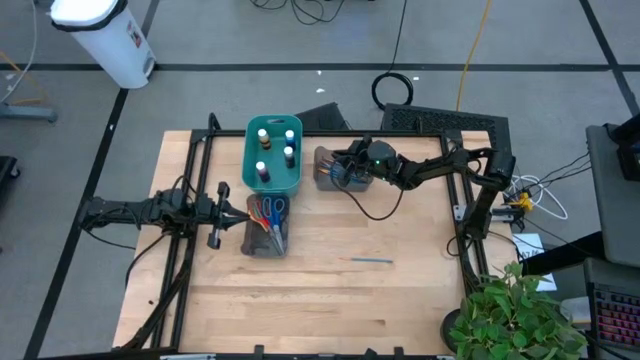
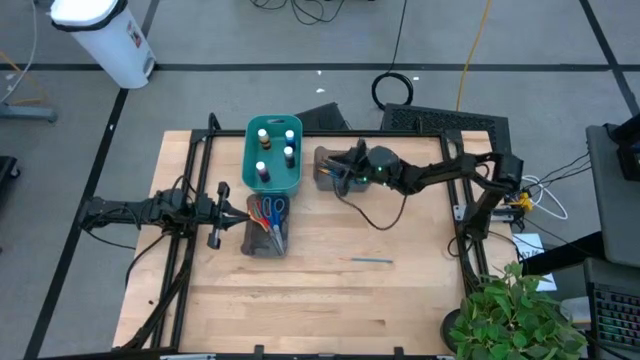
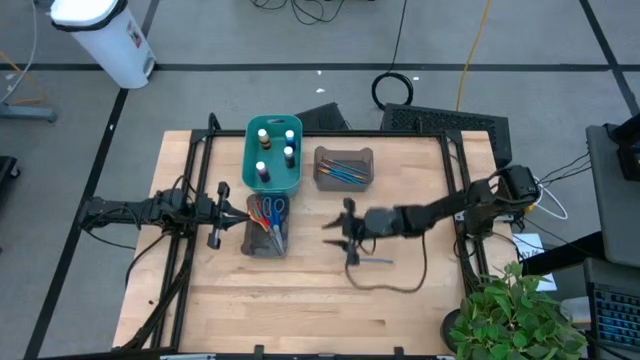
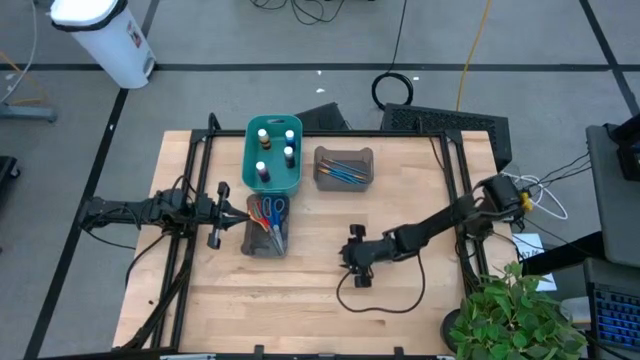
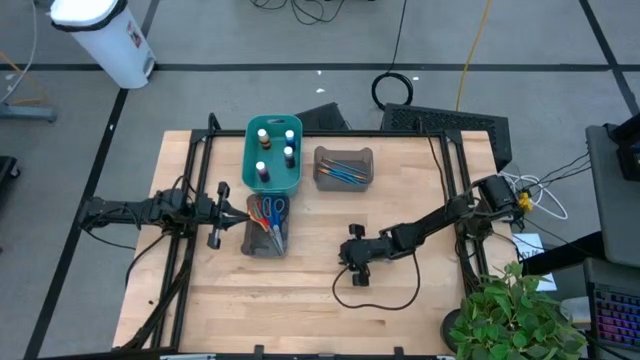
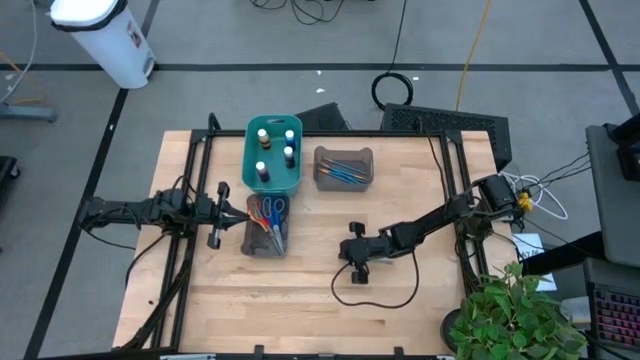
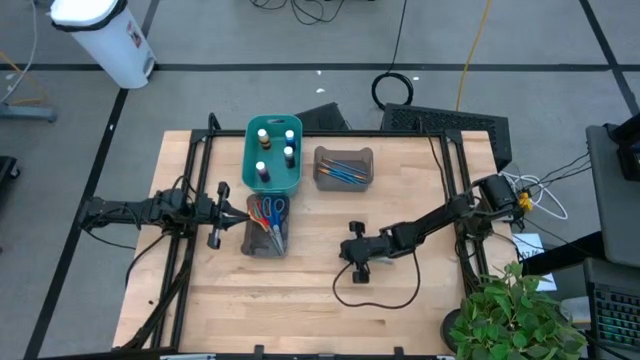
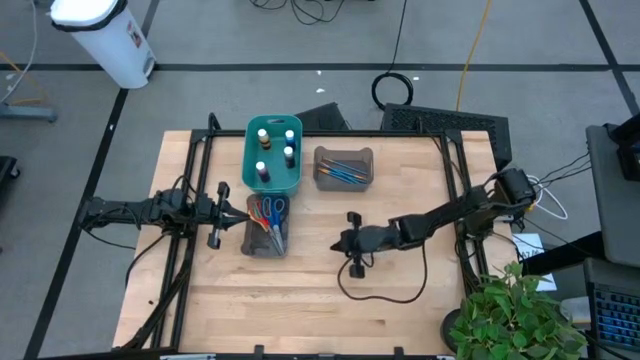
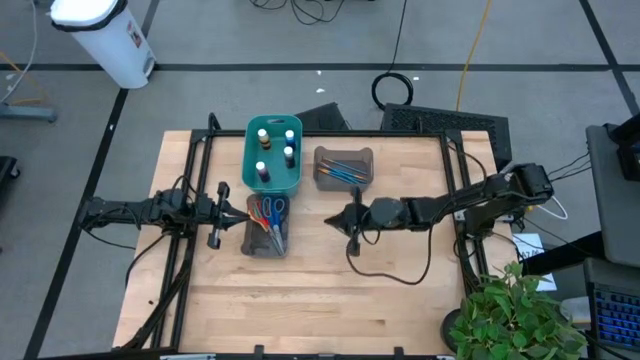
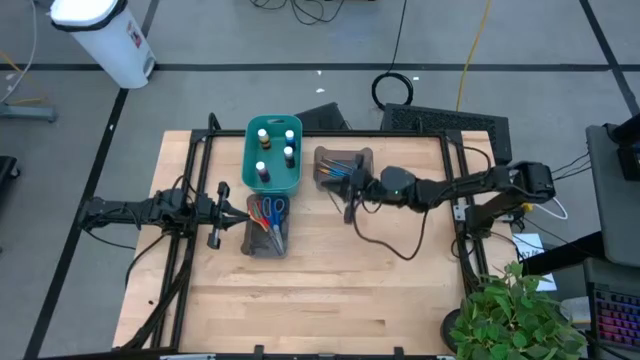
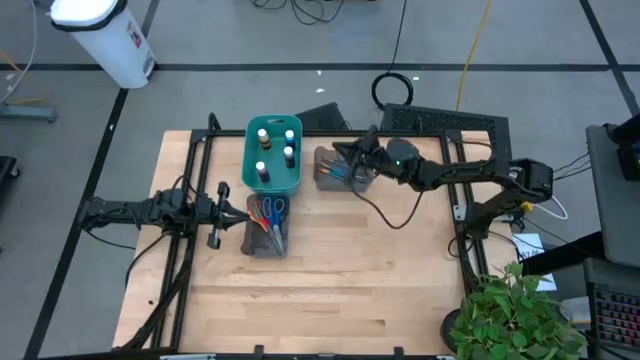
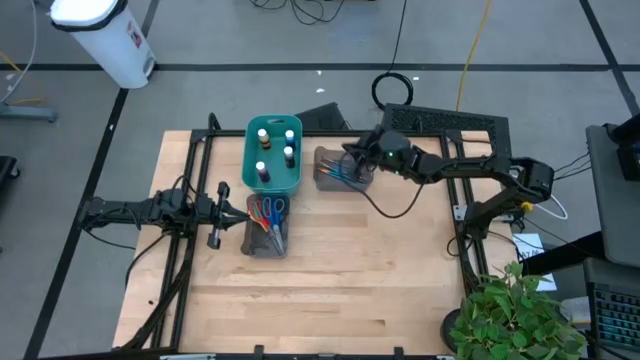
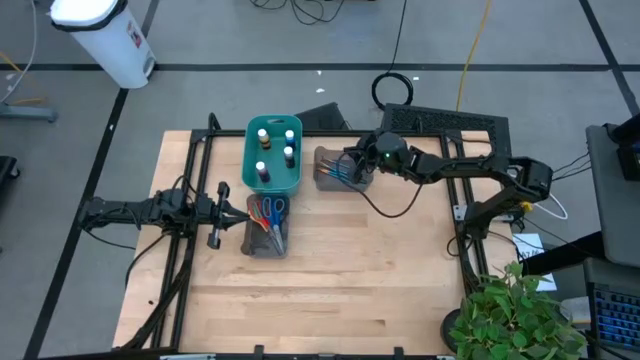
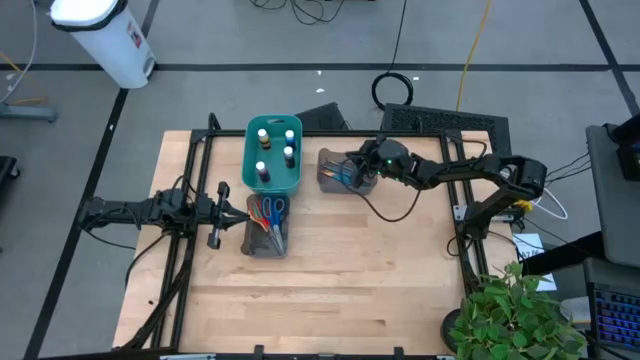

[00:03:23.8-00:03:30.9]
Task: Pick & Place Paint Supplies
Put the blue paintbrush into the top black bin

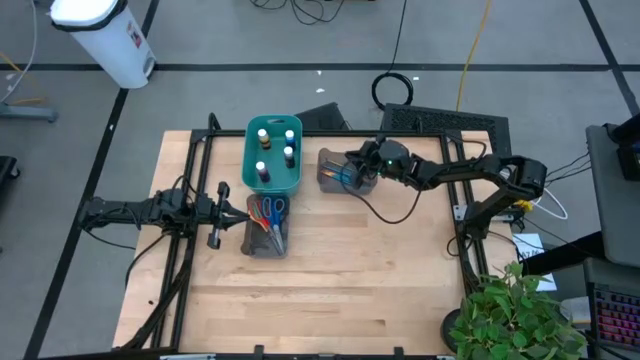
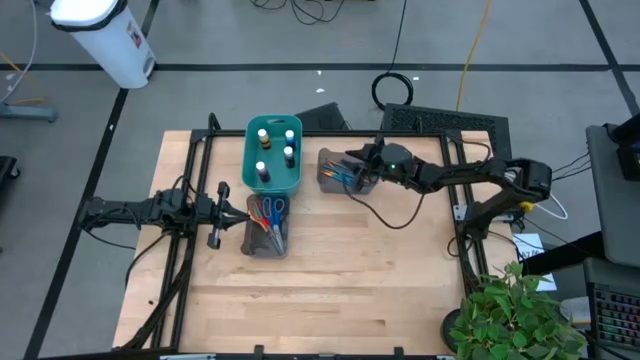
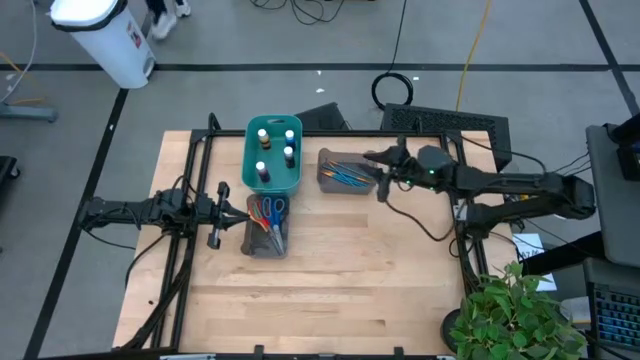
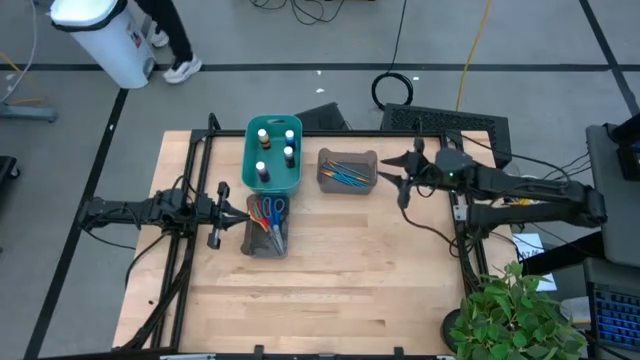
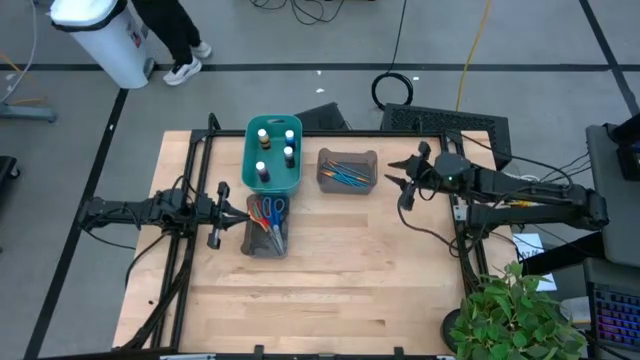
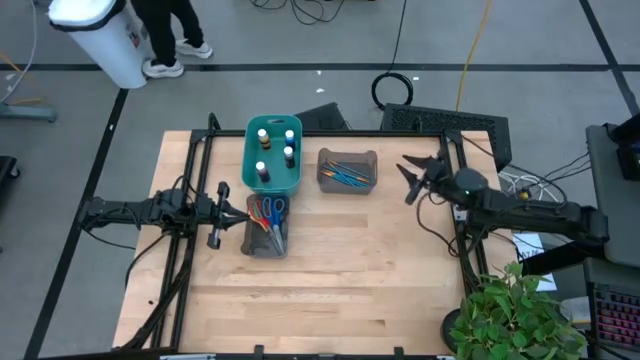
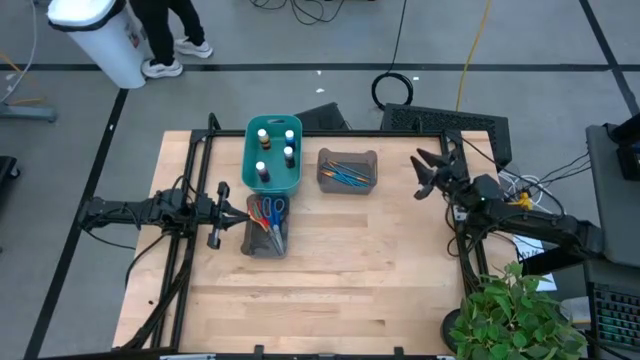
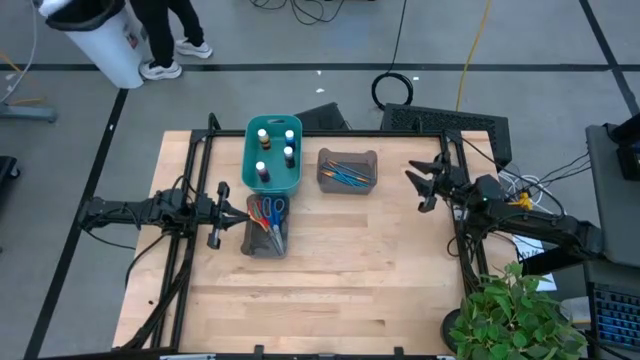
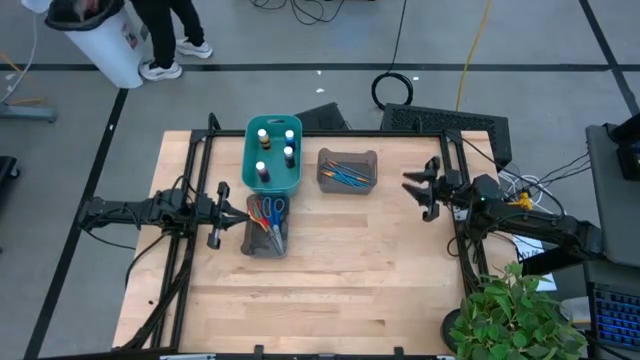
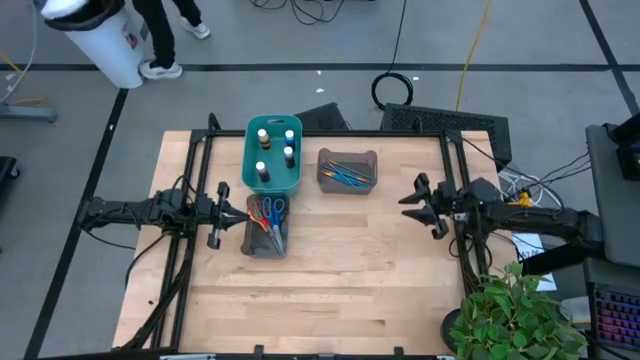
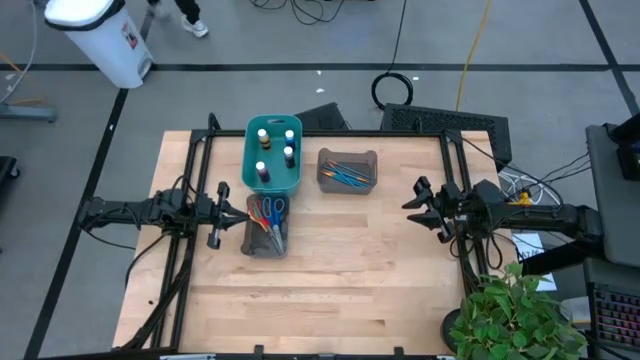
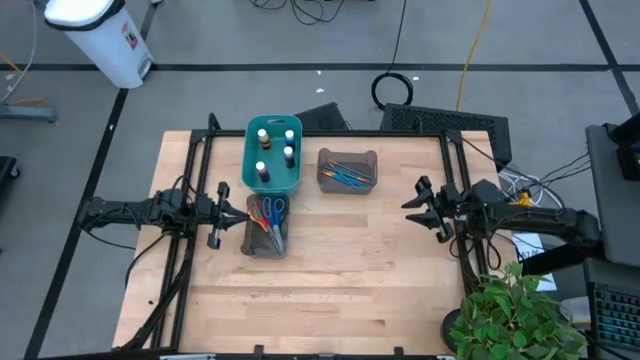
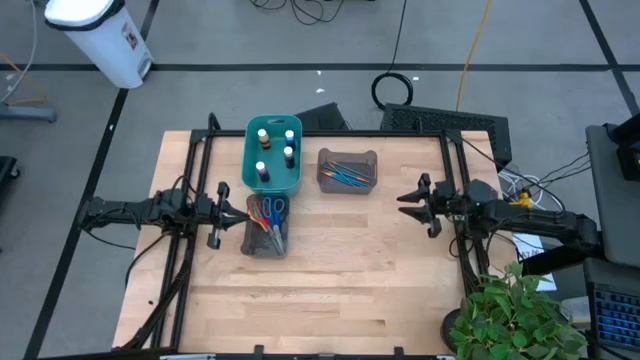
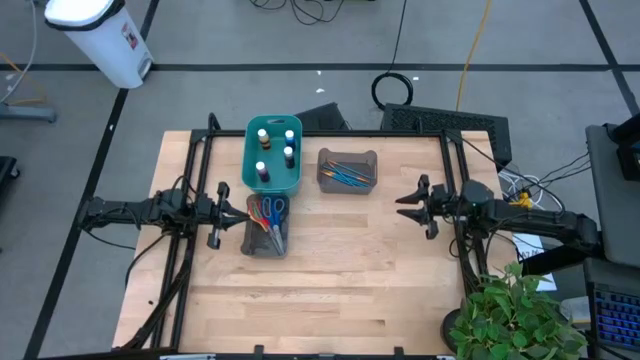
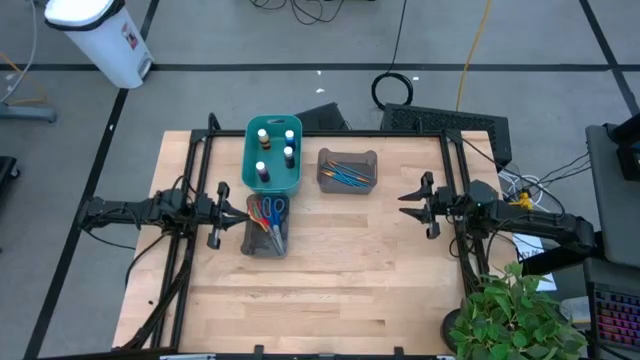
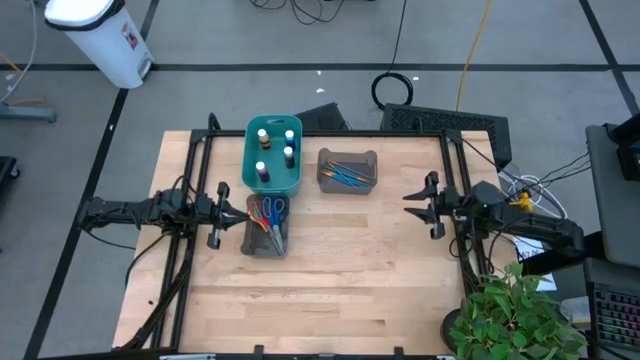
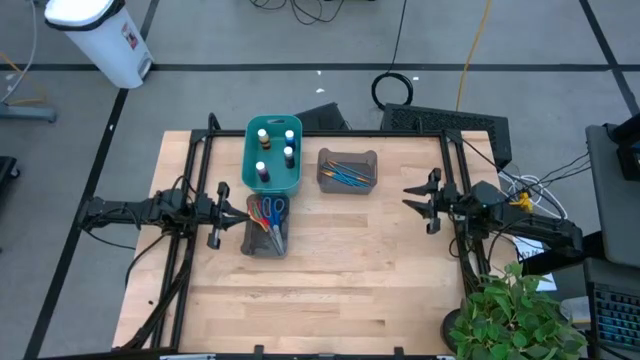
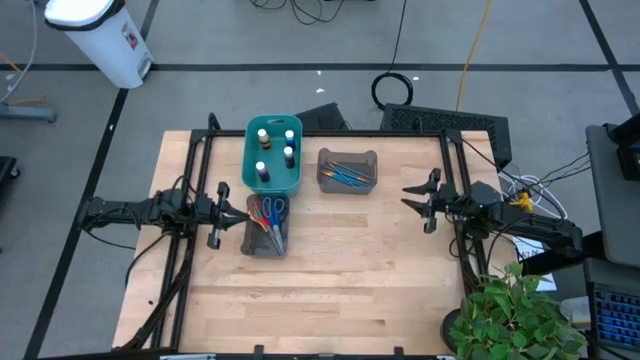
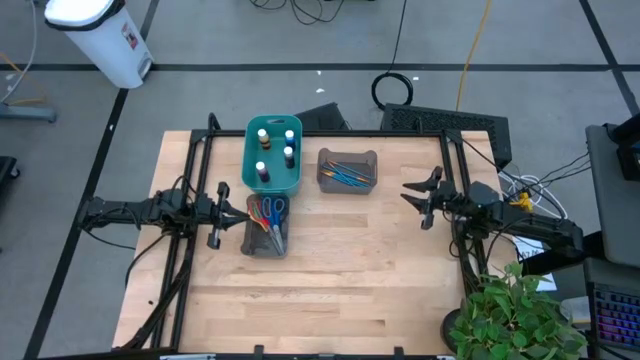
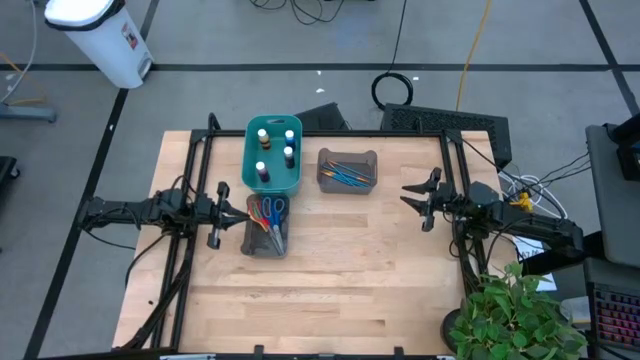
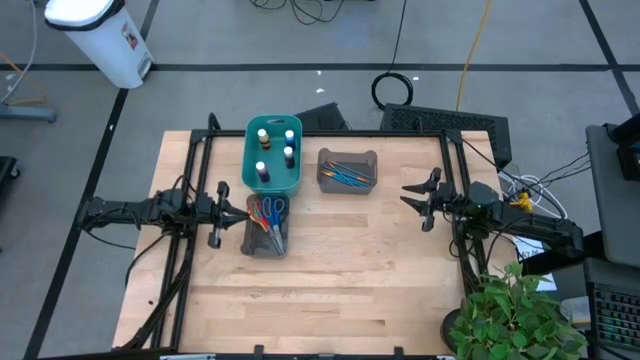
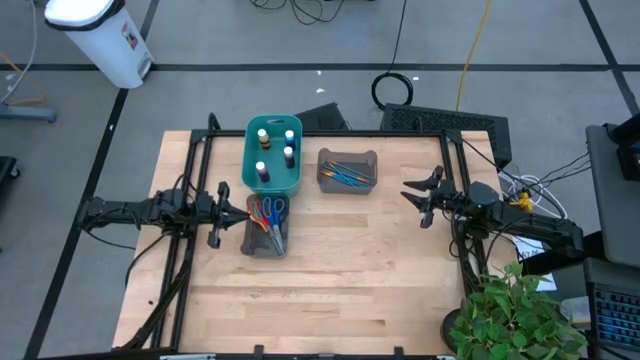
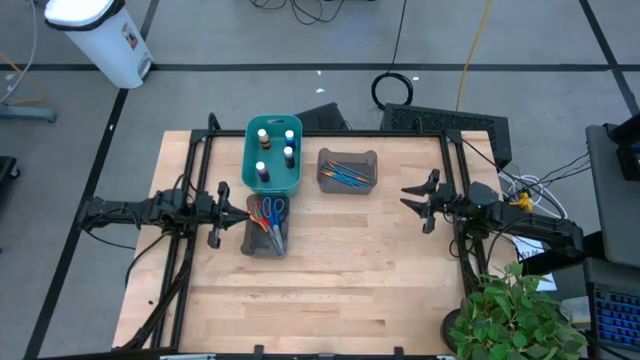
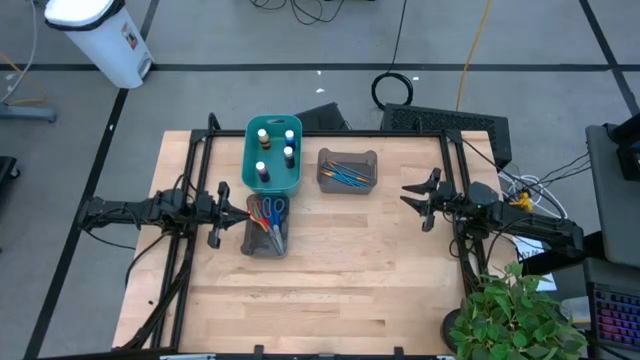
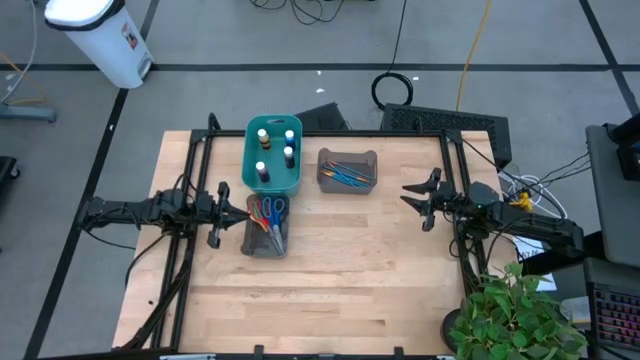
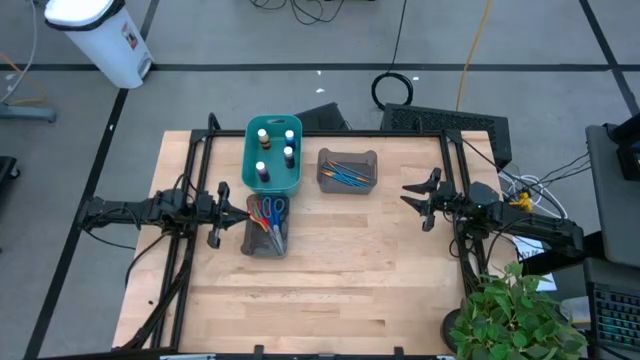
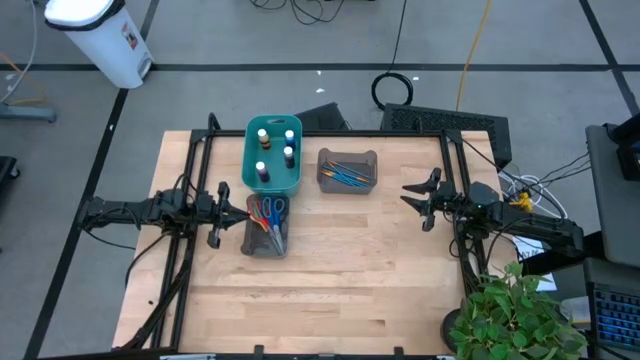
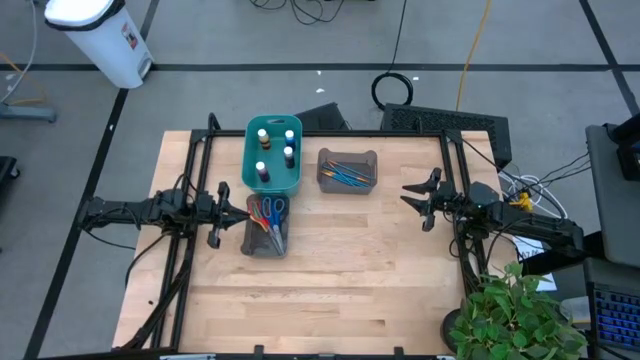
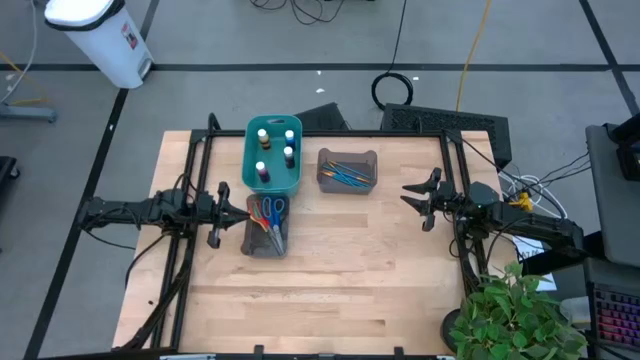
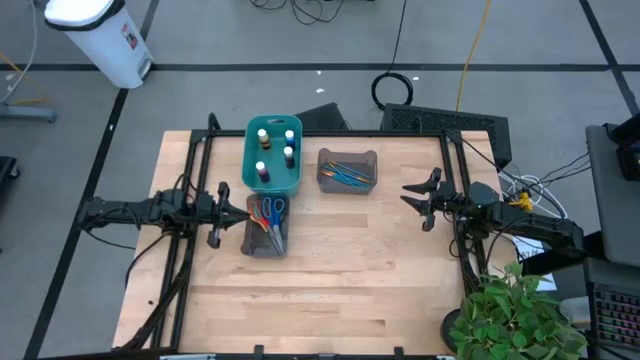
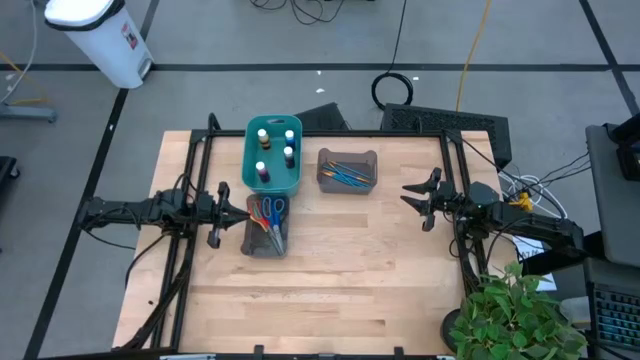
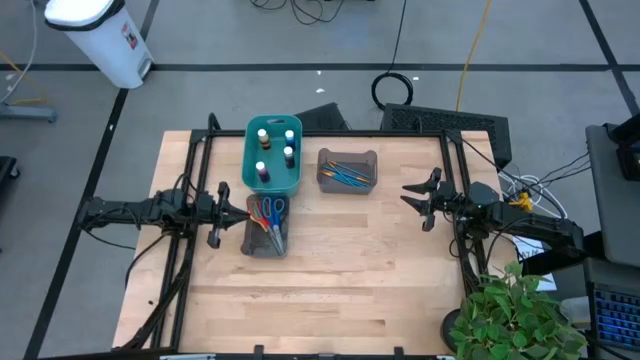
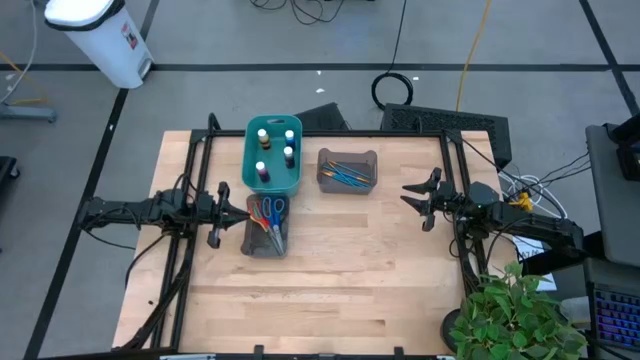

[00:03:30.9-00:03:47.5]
Return to Home Position
